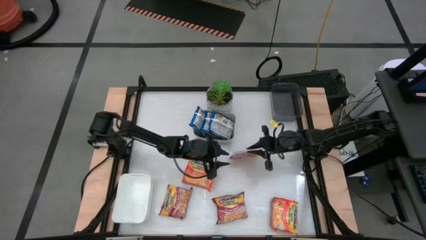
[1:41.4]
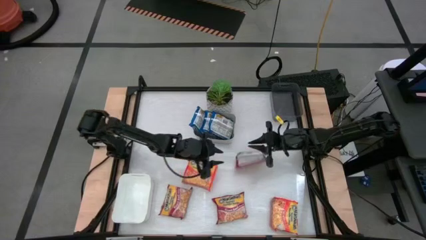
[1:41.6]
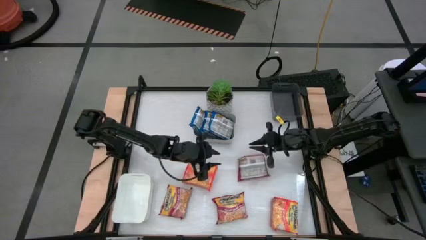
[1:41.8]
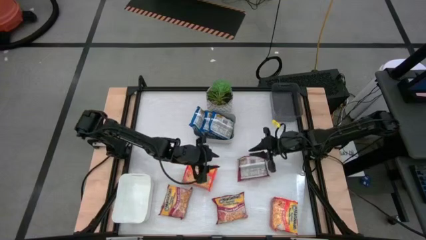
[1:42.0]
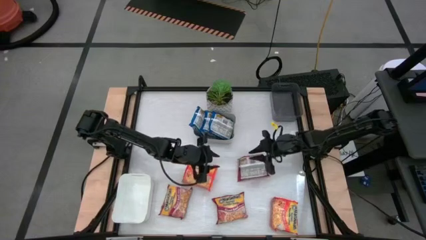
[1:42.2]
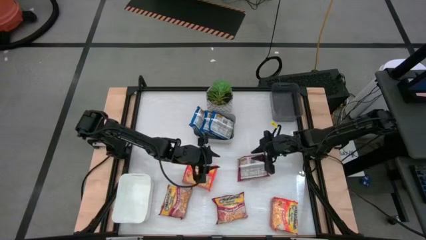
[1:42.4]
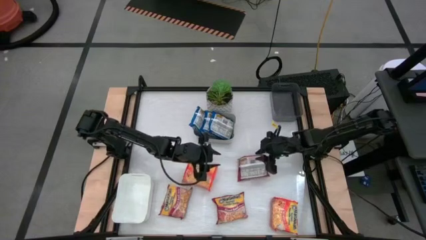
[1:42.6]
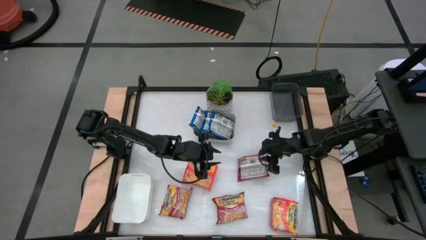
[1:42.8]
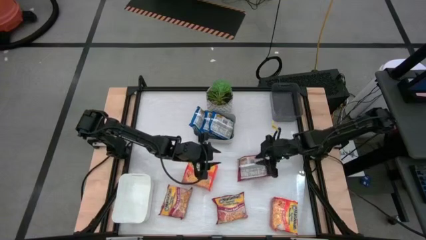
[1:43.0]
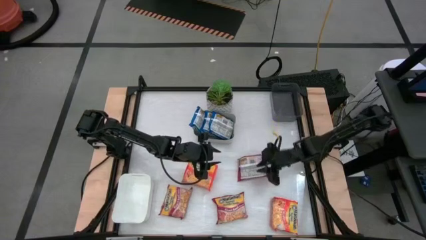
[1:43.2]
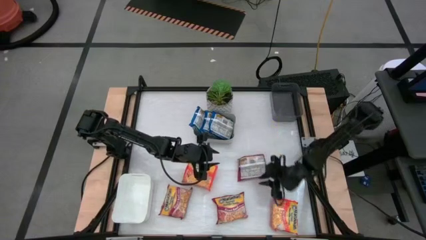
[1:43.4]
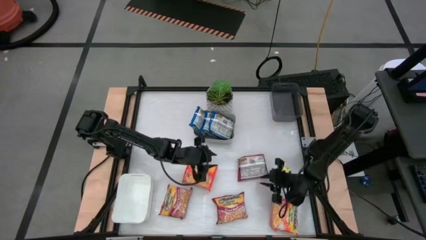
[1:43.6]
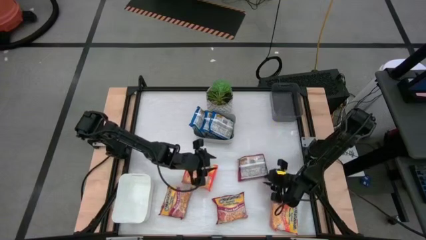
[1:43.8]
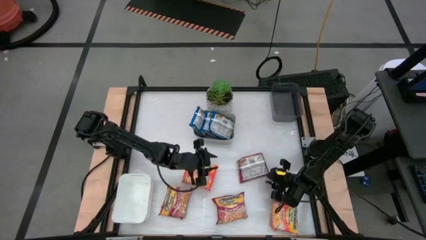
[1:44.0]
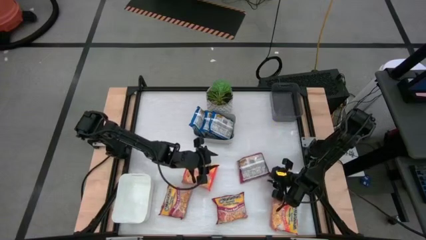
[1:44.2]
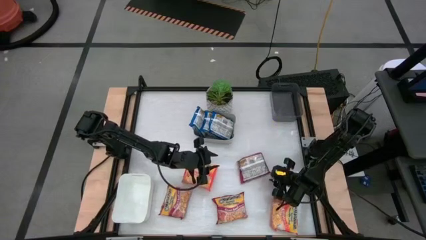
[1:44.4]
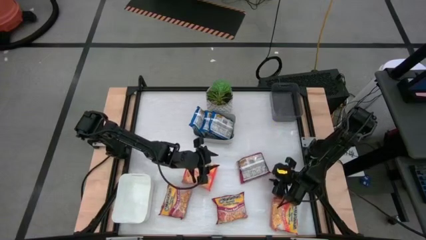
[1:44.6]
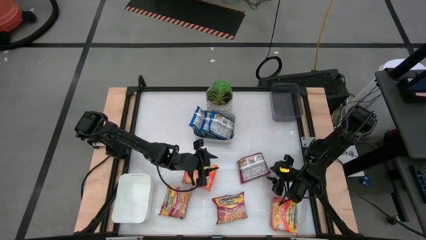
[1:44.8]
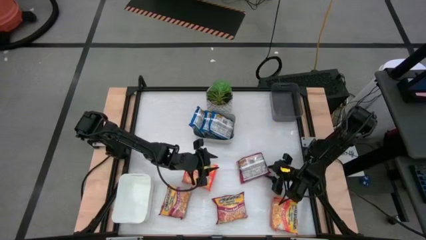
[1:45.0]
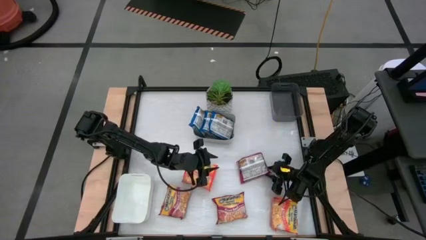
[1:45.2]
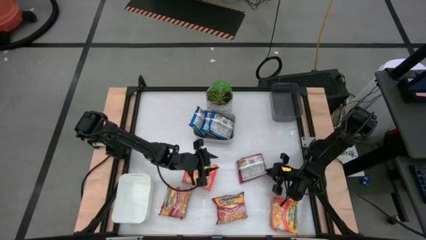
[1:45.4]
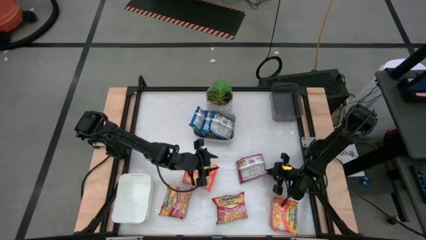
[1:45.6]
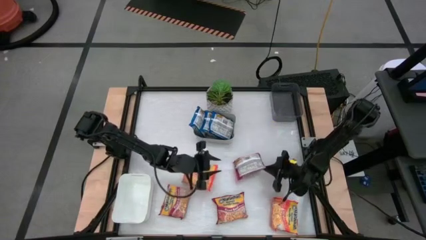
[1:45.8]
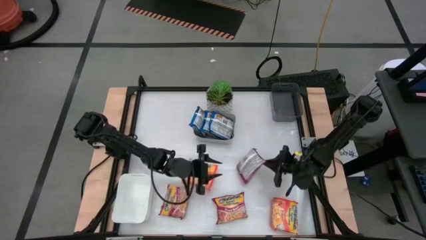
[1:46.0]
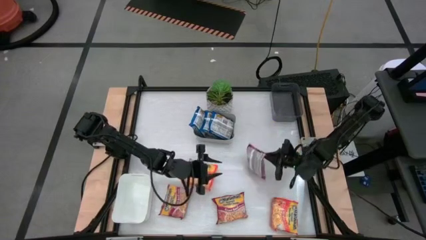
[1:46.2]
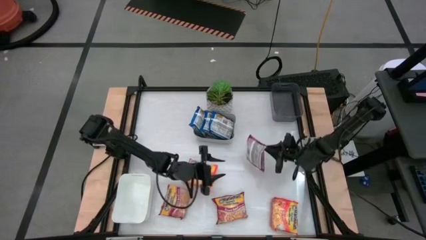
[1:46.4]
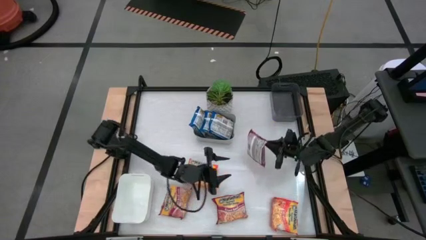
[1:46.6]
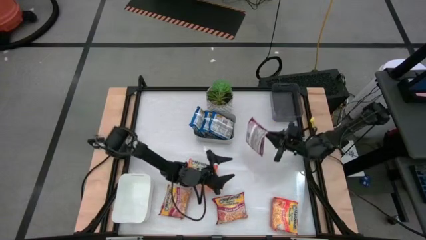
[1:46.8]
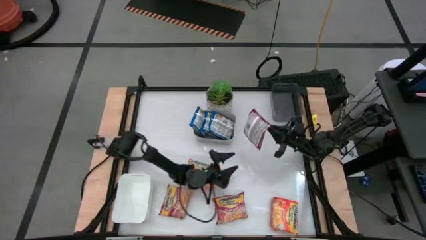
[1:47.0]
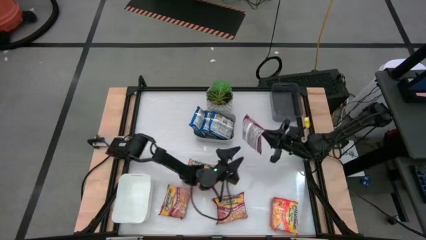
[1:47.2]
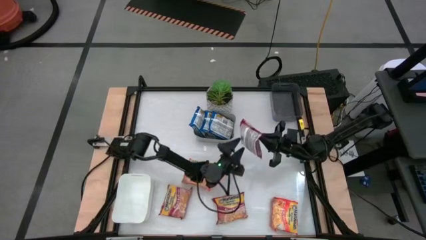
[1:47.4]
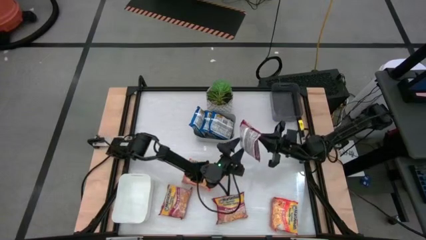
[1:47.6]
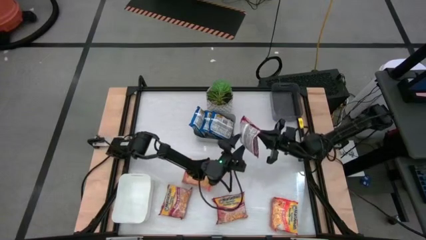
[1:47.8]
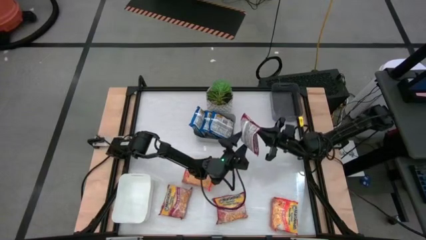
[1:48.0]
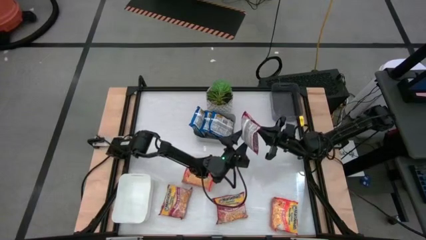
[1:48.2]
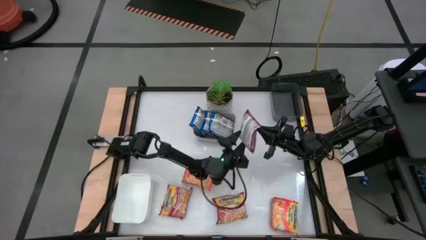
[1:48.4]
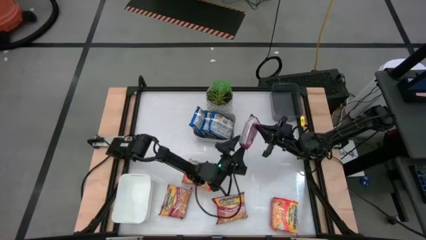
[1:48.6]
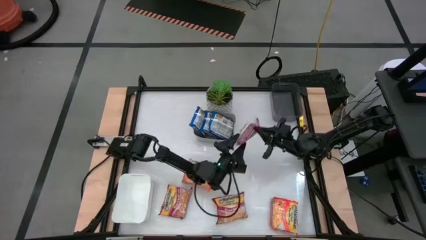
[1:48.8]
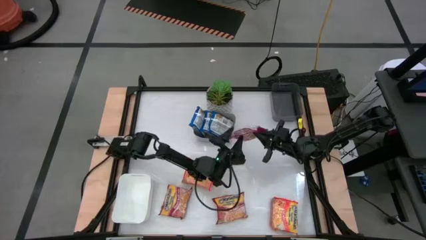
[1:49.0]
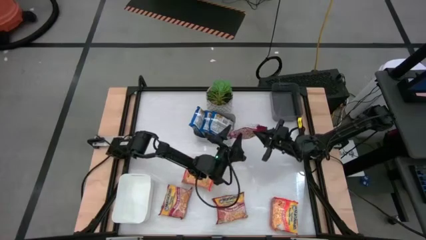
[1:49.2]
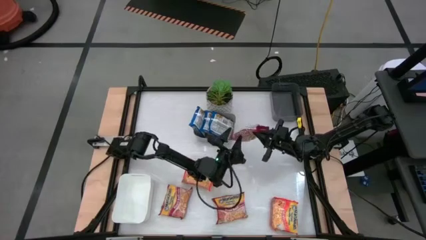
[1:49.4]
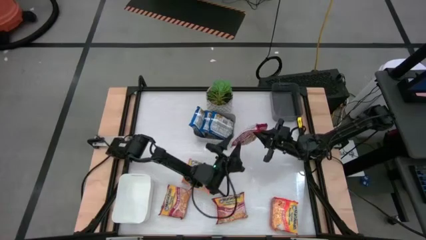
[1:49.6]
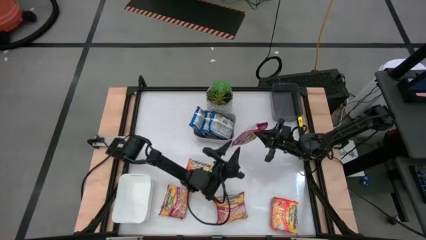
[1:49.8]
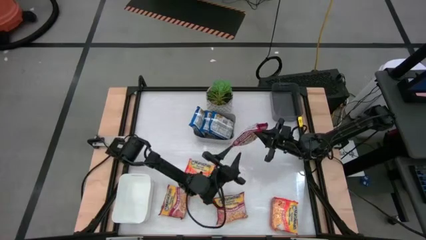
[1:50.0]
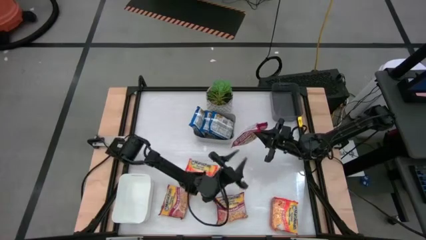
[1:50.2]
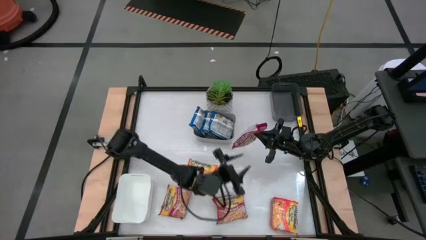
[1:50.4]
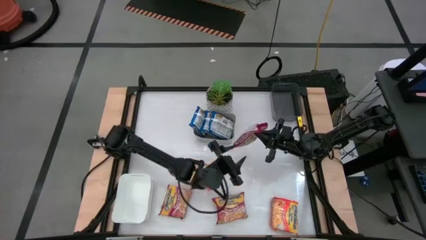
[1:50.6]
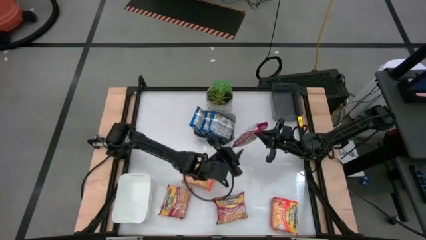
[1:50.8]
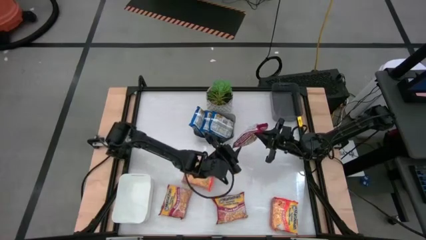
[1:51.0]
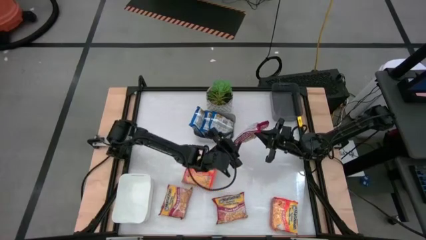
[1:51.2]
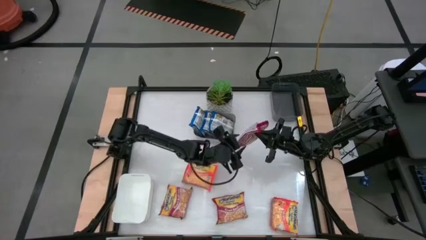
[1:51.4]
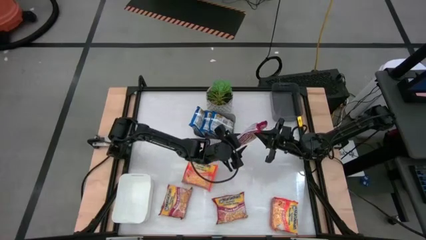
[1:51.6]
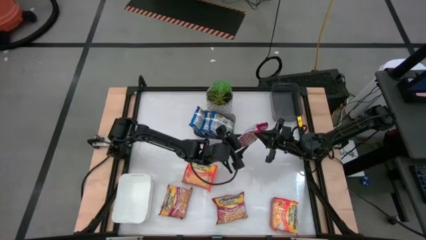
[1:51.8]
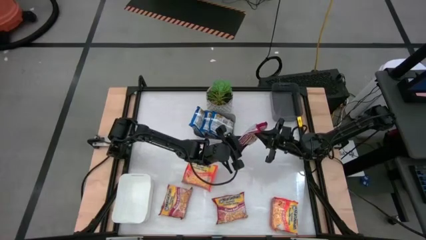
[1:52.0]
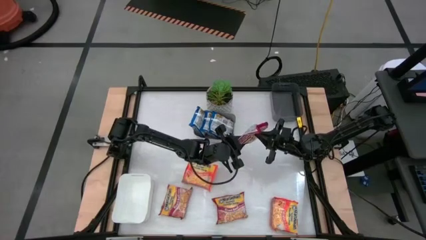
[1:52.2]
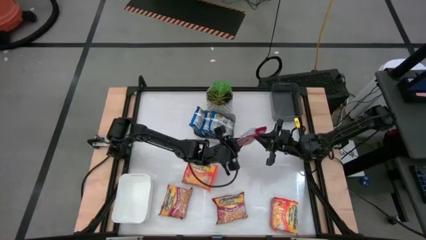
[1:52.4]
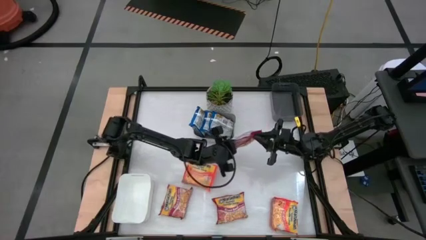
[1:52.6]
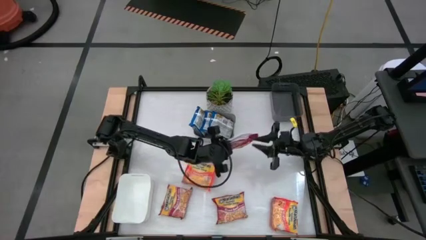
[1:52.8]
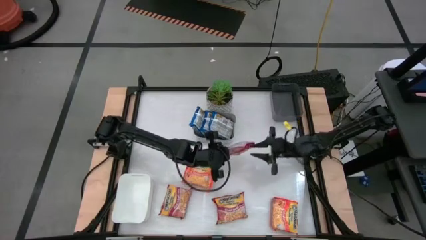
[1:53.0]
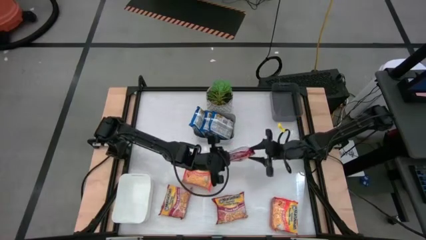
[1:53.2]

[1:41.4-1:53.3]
Task: Sort Maruchan noodles
Put the right red noodle pack into the black bin
